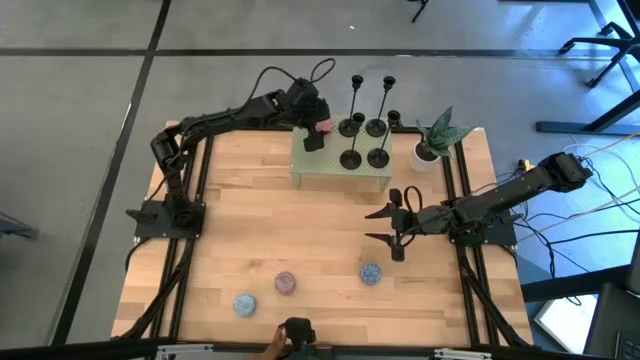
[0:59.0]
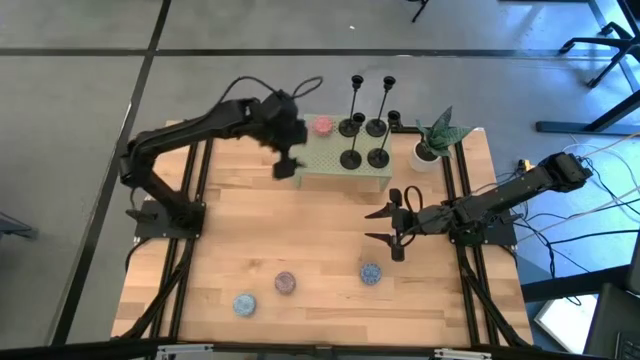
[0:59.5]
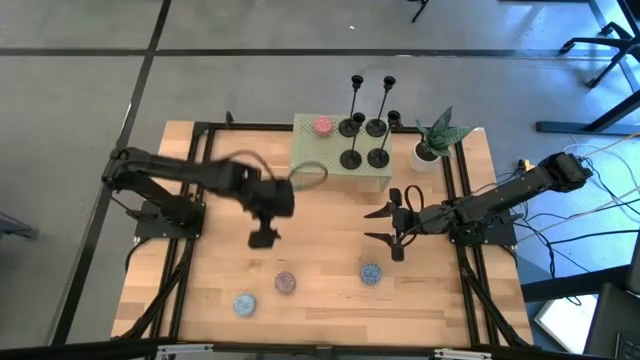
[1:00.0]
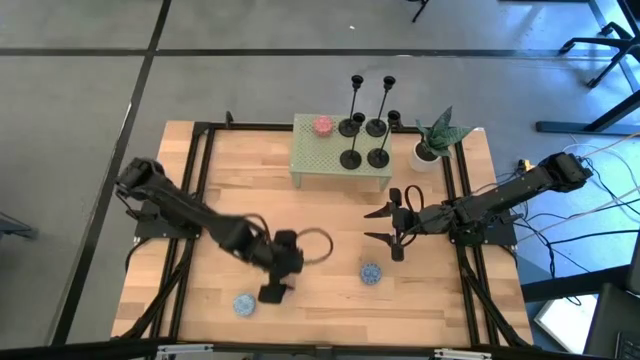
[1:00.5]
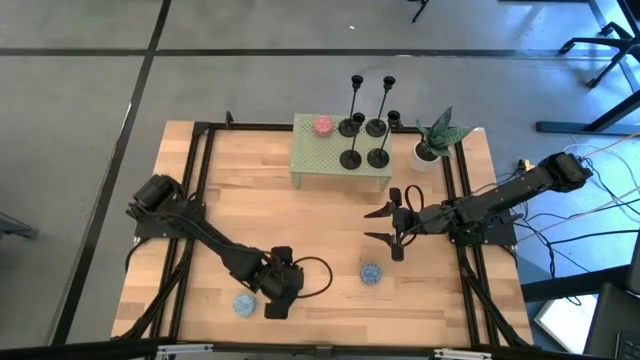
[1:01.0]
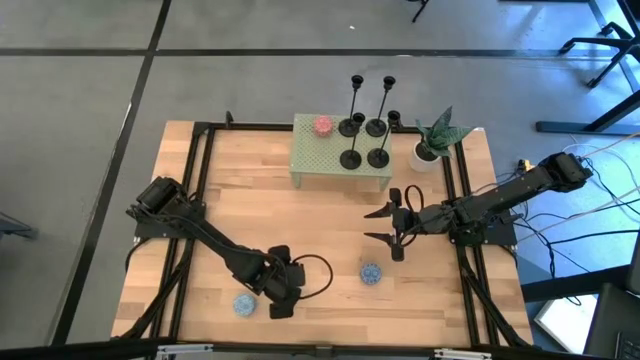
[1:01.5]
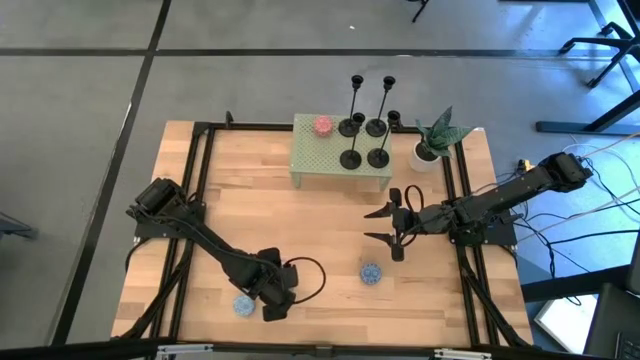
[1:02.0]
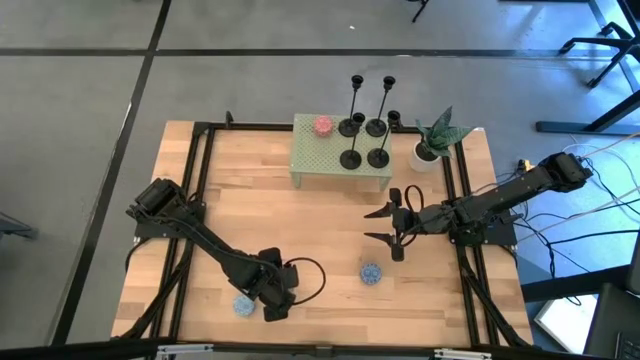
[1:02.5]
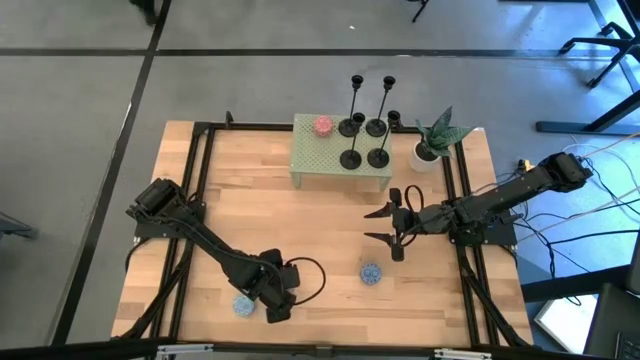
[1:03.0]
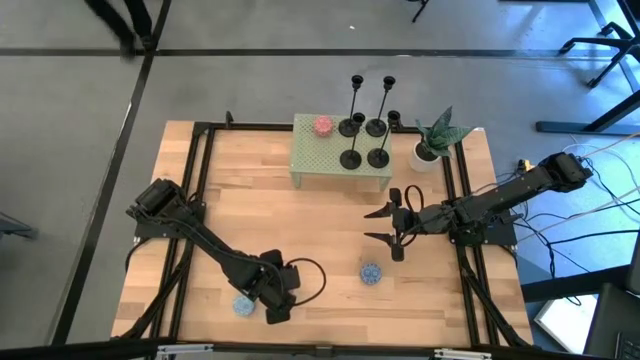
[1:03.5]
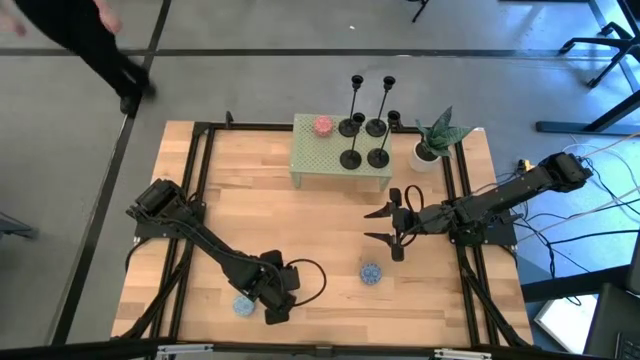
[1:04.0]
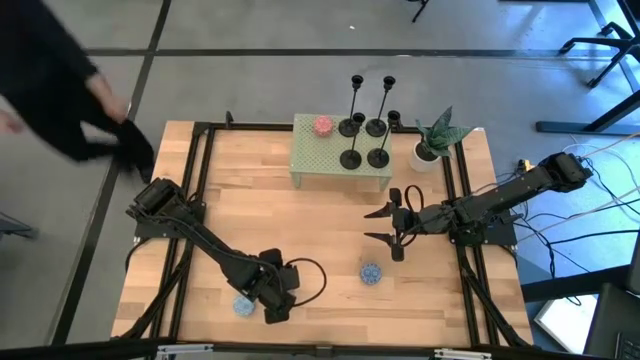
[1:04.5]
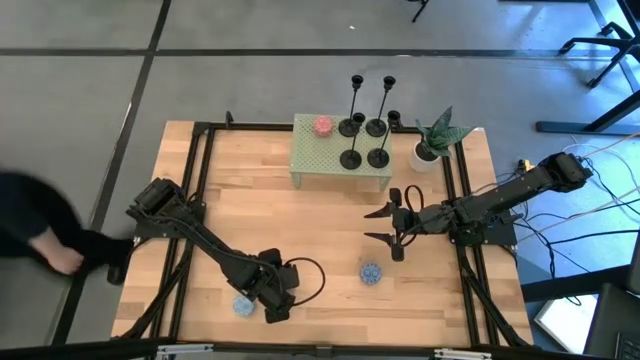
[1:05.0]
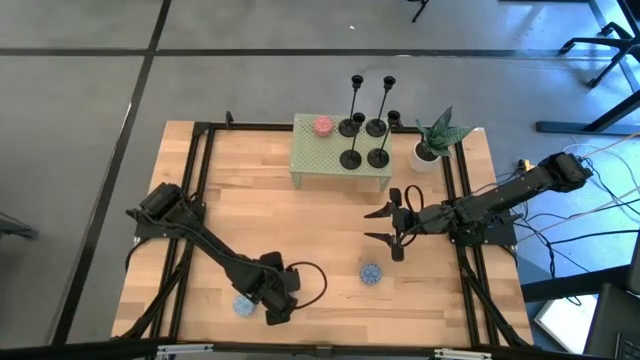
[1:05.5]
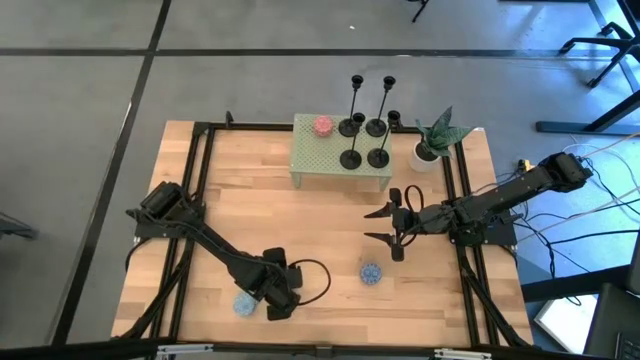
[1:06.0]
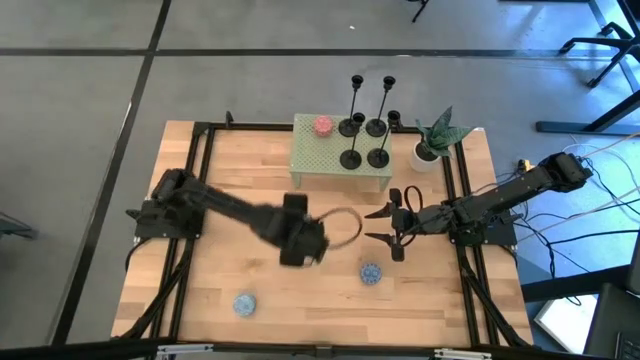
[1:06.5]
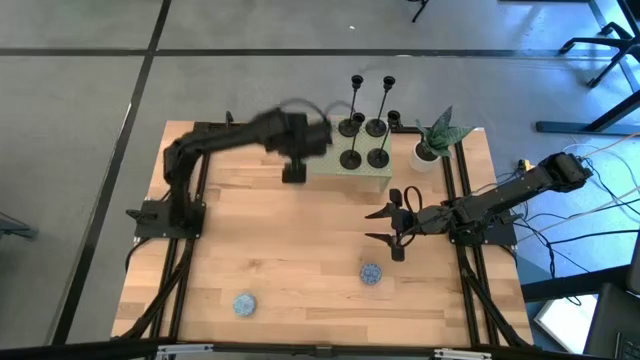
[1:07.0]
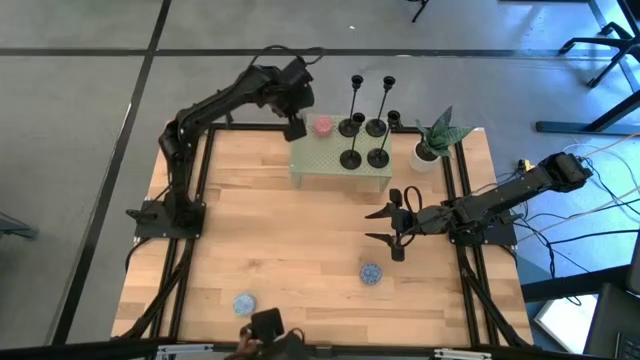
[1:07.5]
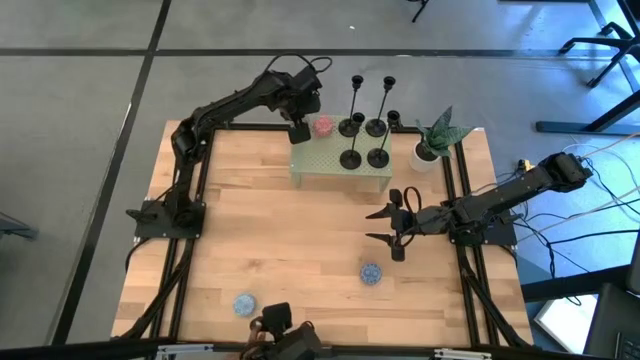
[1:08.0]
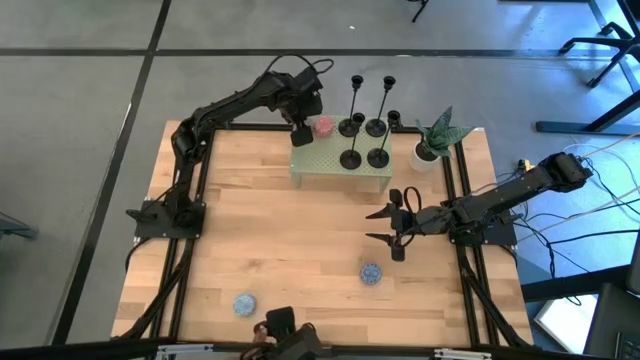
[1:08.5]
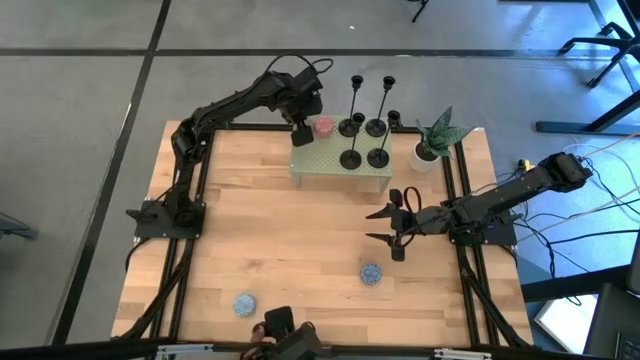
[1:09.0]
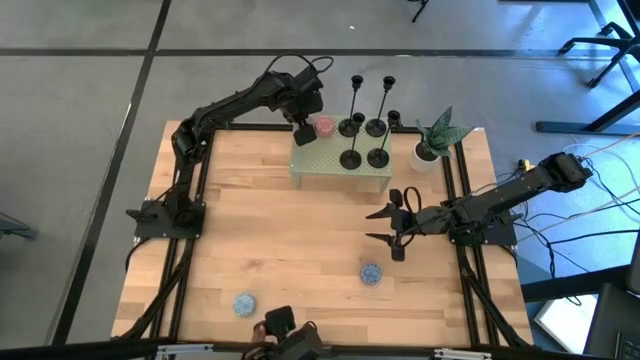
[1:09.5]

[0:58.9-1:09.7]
Task: Pick & Place candle stick holders
Put the red scented candle on the shelf

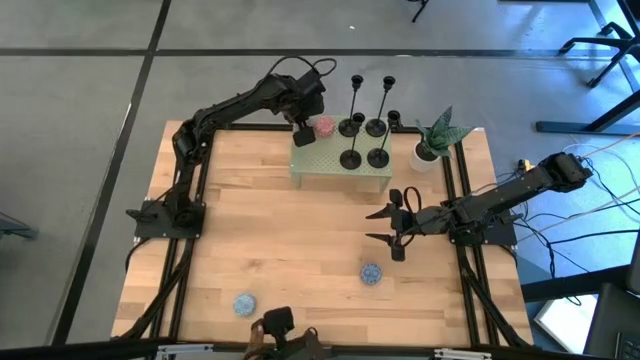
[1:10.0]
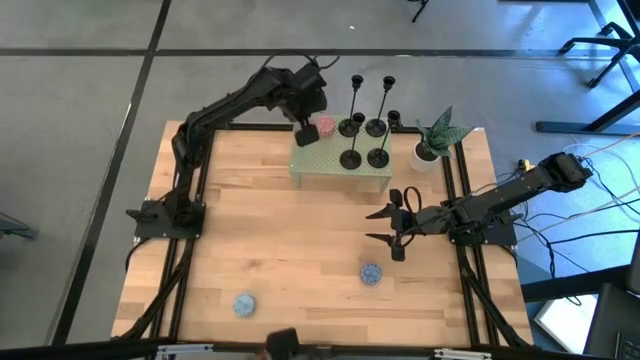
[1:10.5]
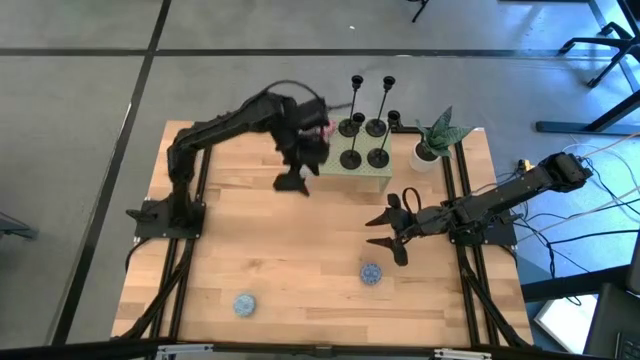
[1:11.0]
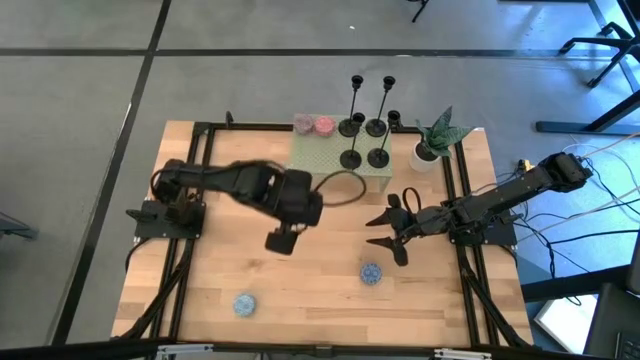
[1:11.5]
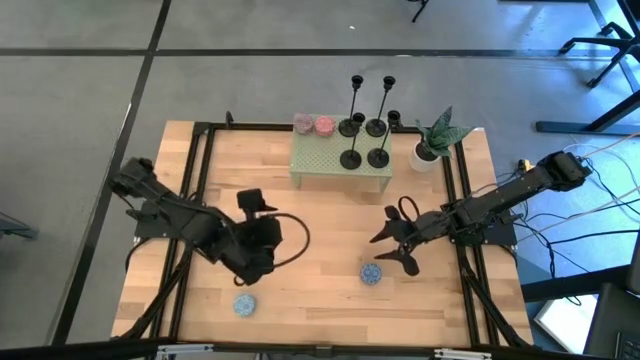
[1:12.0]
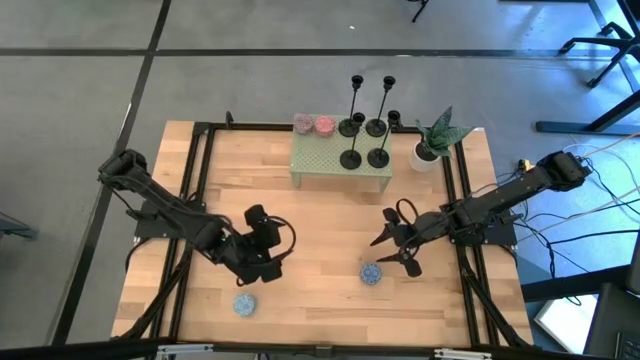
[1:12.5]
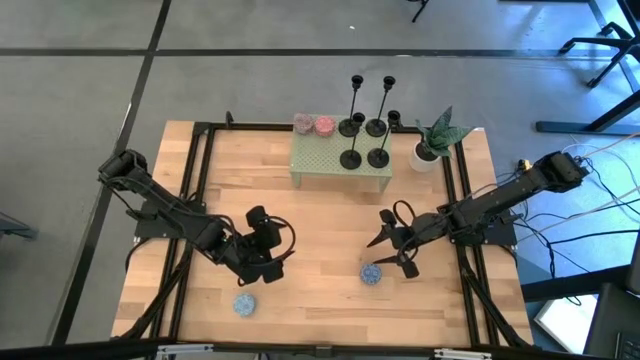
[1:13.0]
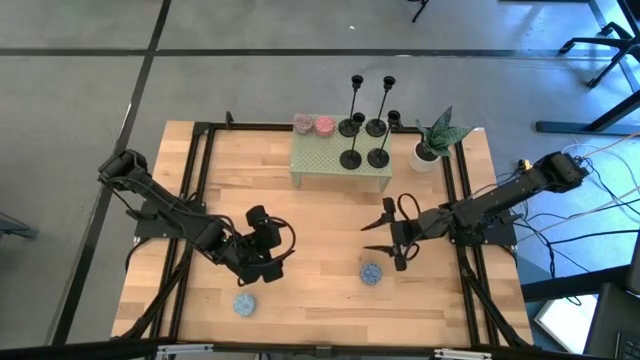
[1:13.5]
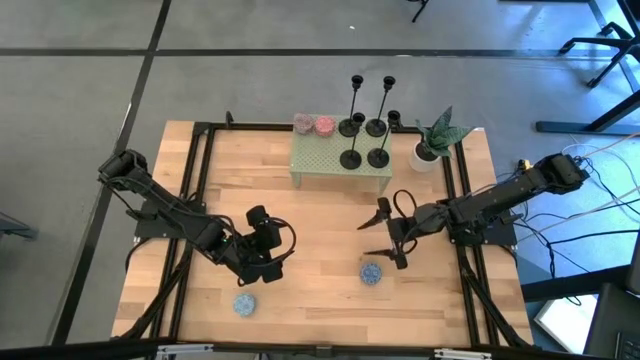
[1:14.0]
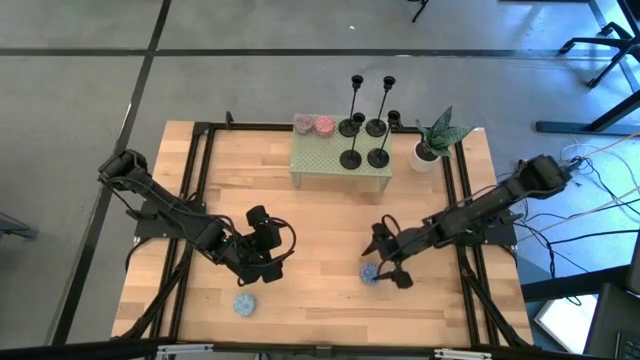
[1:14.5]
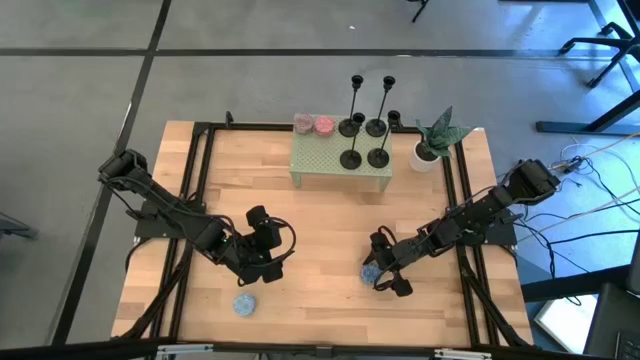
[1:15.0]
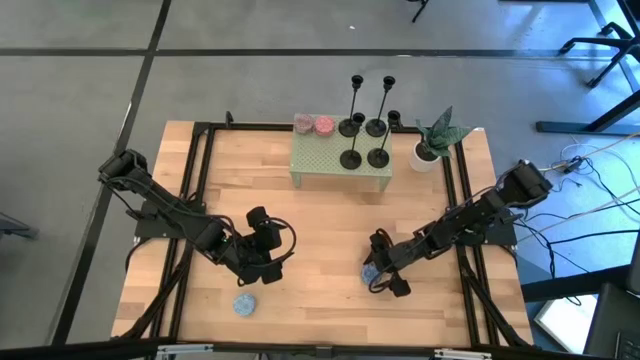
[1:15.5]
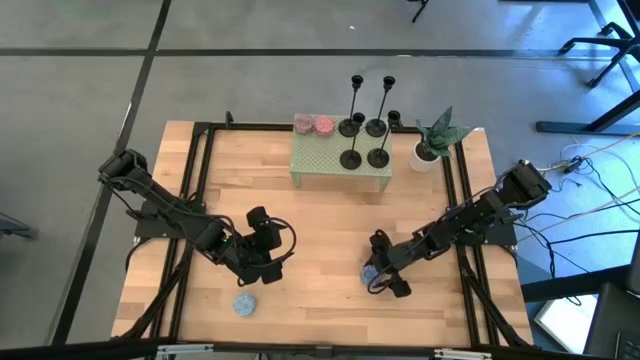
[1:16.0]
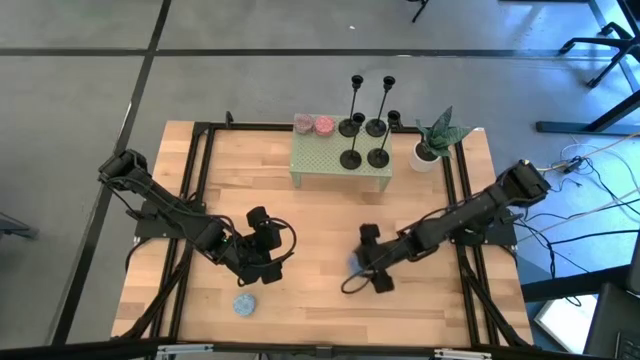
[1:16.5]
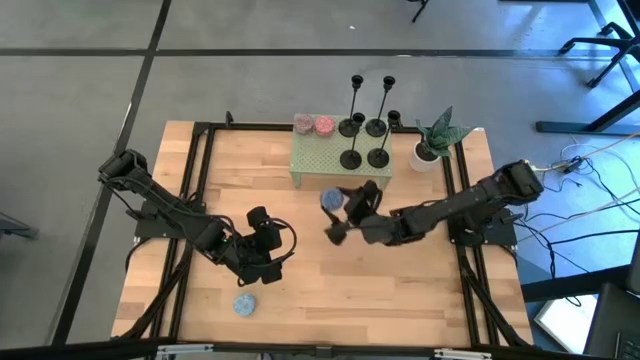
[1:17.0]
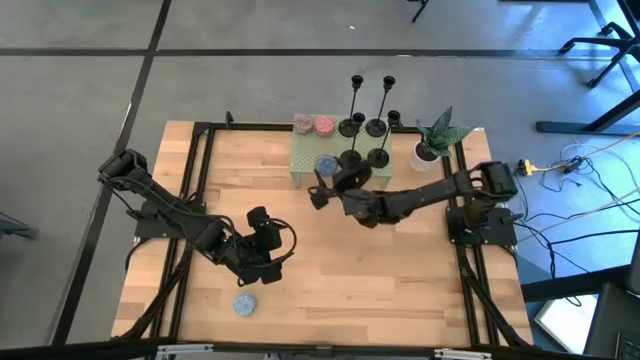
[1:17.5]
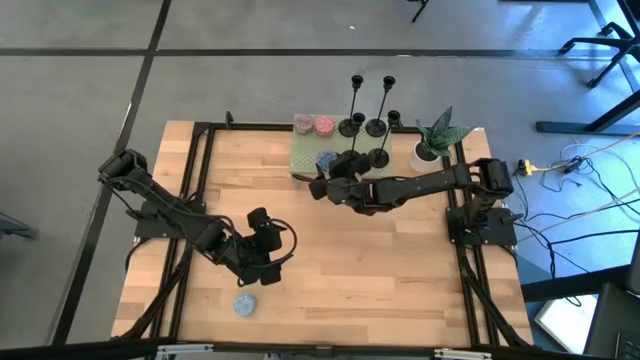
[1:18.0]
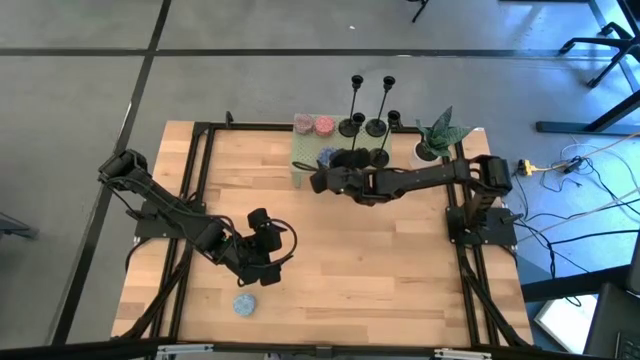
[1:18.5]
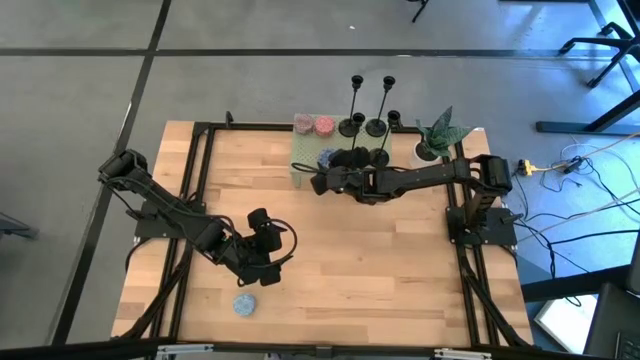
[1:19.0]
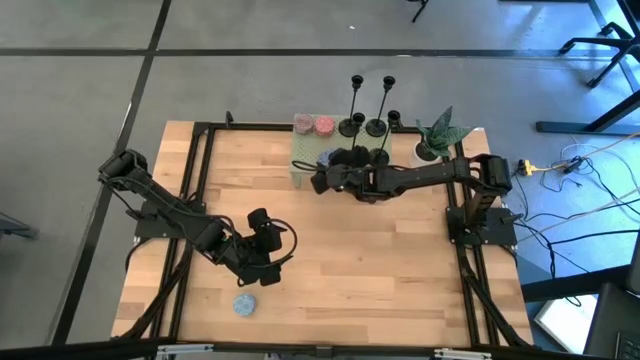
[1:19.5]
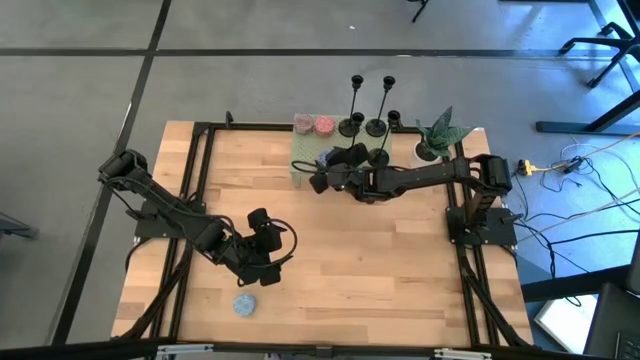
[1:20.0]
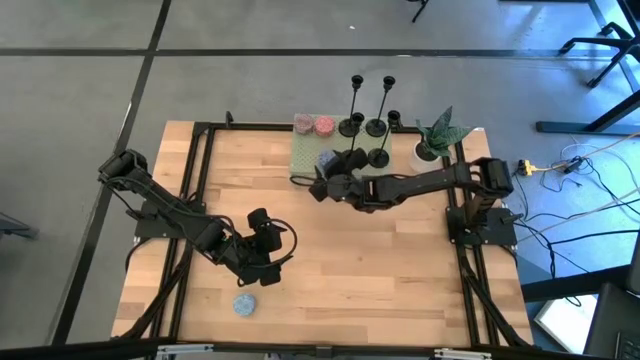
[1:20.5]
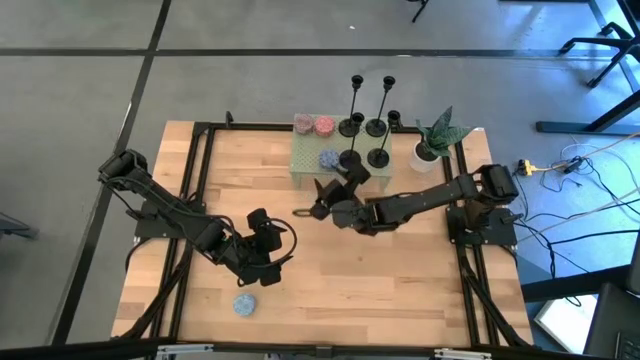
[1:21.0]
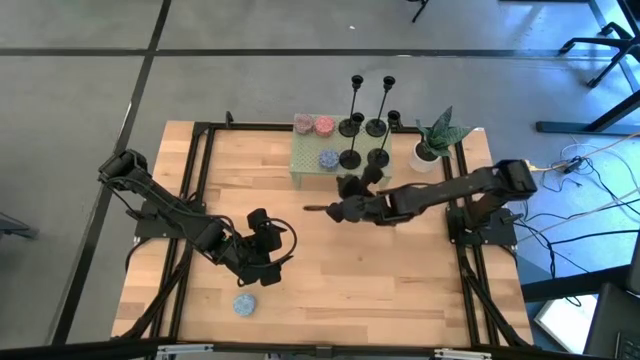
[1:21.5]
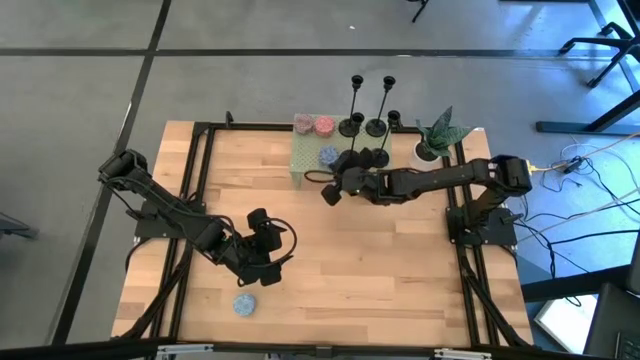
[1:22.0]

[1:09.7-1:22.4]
Align the blue scented candle with the orange scented candle on the shelf
